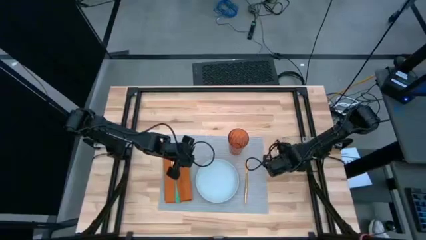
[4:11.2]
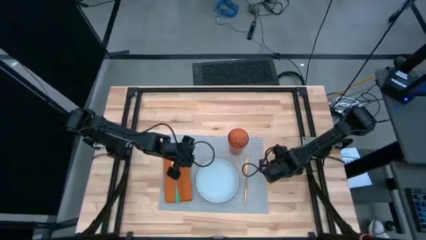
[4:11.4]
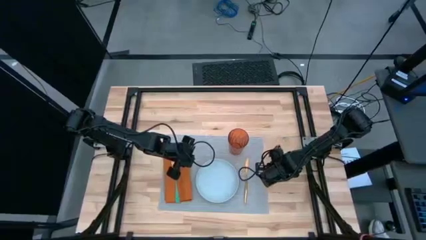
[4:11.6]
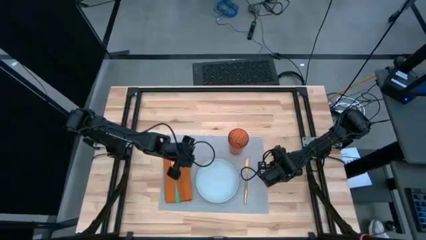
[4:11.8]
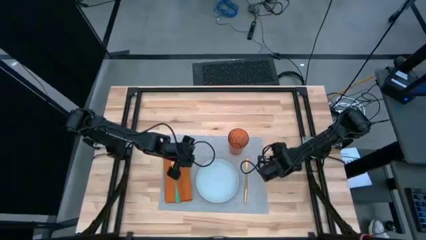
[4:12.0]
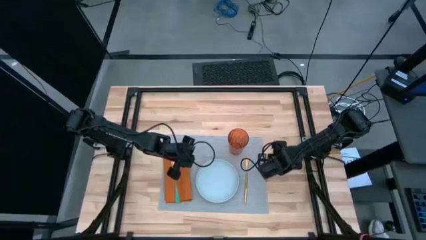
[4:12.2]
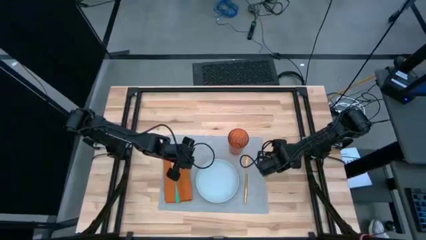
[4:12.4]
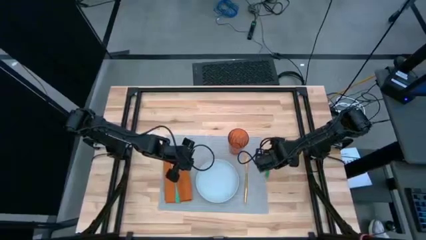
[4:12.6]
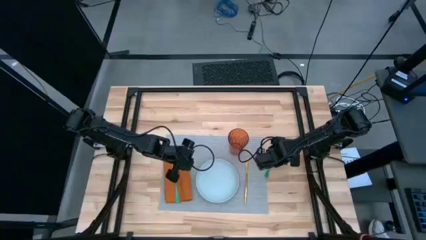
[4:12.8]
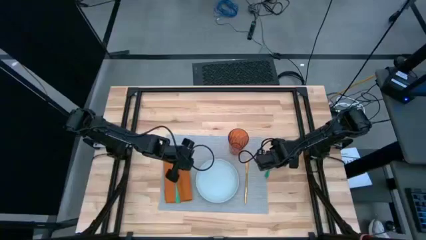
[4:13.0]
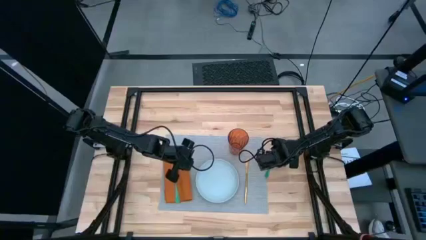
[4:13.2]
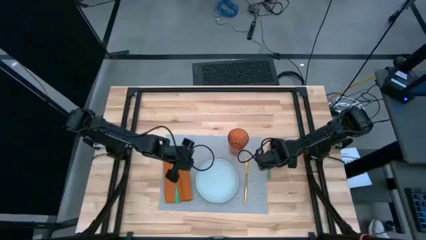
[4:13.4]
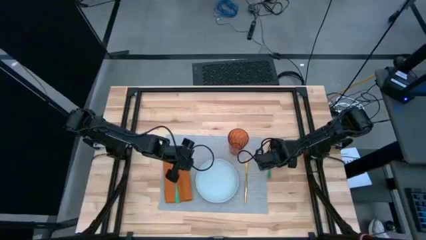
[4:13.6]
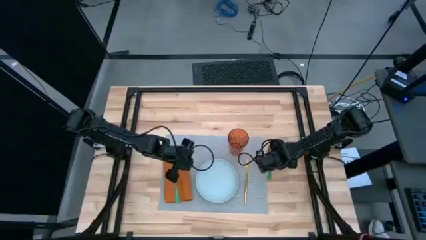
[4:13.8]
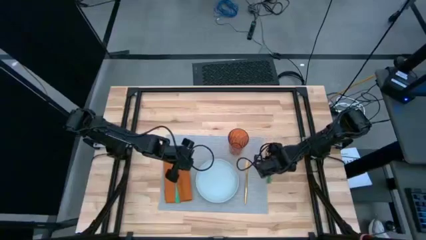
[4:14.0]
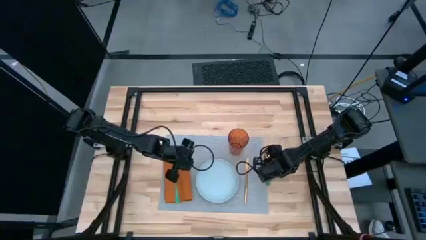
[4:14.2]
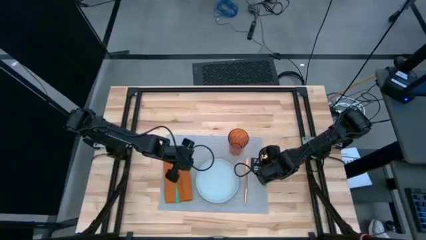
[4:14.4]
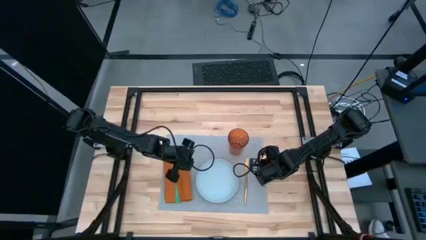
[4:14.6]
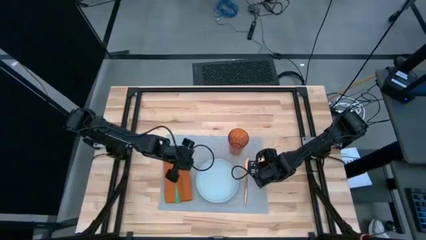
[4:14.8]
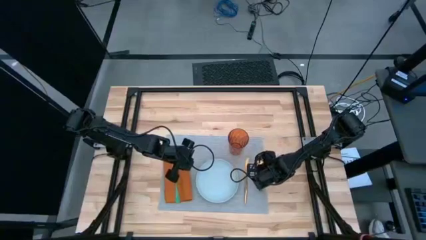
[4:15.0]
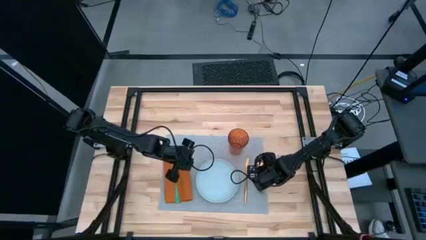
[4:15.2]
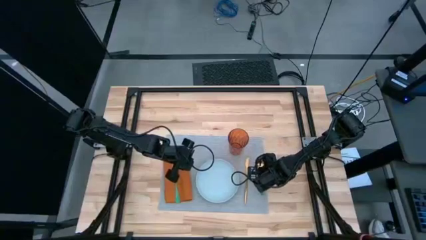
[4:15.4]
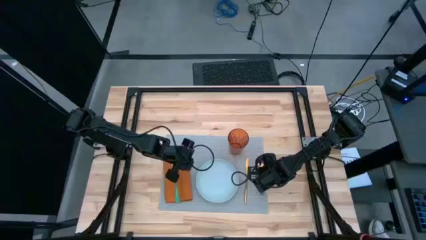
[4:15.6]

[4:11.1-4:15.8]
Task: Set table place
Put the green spoon to the right of the gold table knife on the gray placemat

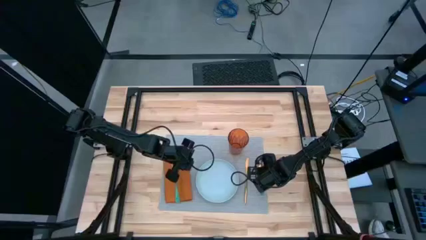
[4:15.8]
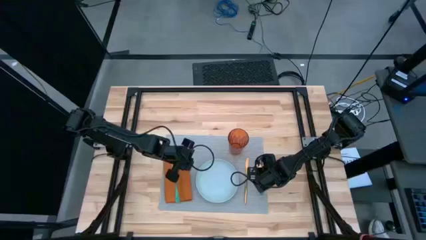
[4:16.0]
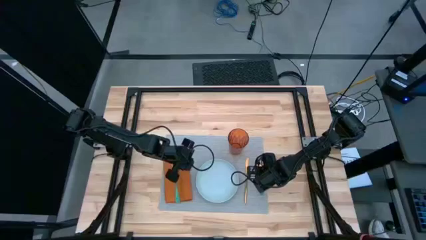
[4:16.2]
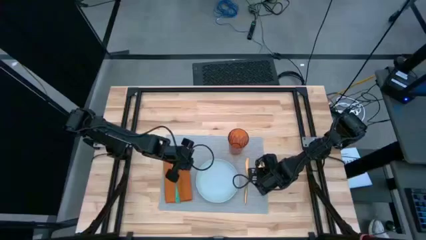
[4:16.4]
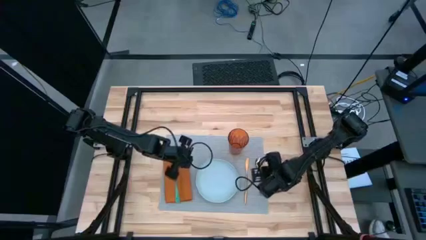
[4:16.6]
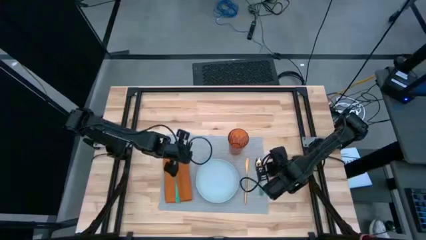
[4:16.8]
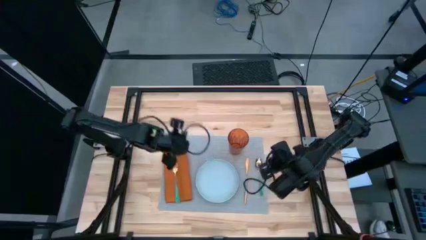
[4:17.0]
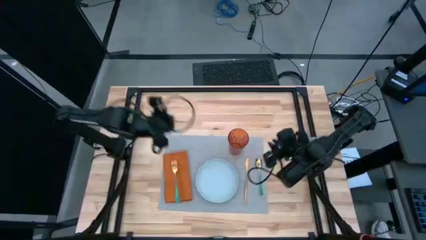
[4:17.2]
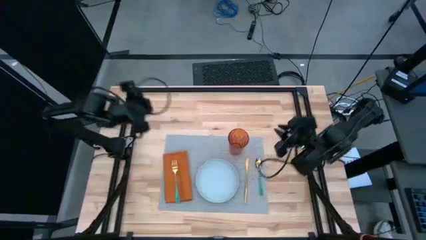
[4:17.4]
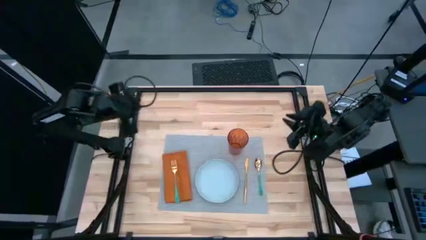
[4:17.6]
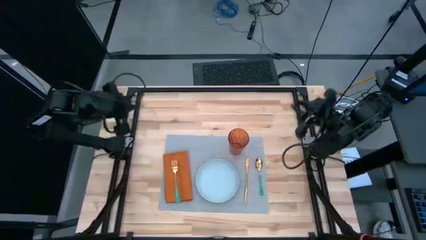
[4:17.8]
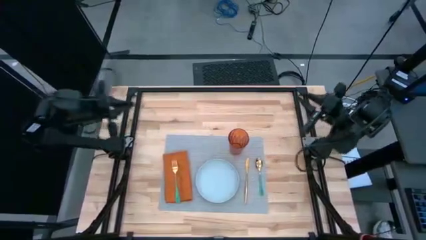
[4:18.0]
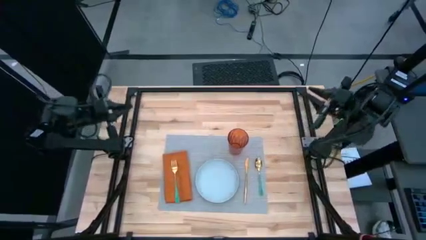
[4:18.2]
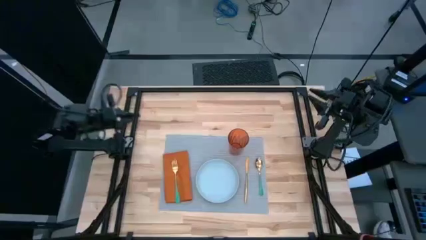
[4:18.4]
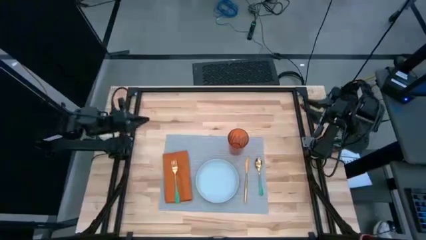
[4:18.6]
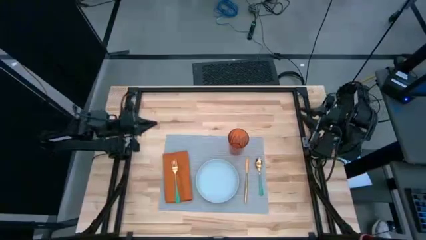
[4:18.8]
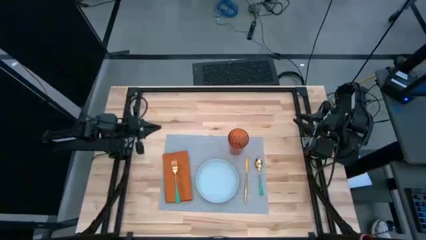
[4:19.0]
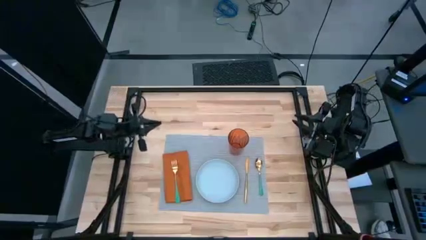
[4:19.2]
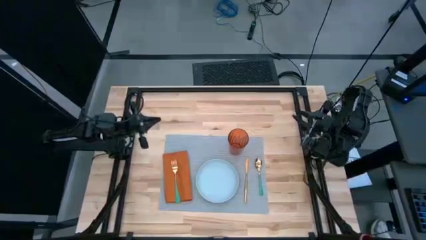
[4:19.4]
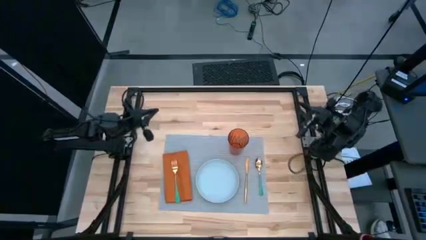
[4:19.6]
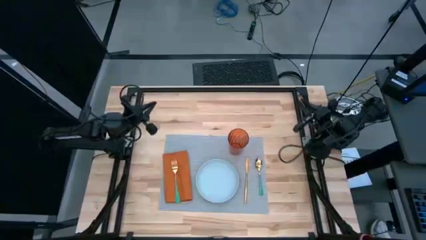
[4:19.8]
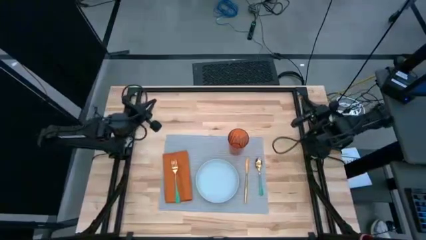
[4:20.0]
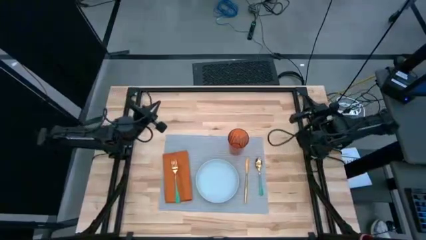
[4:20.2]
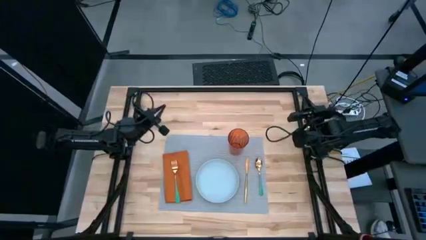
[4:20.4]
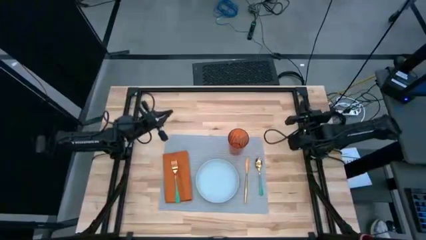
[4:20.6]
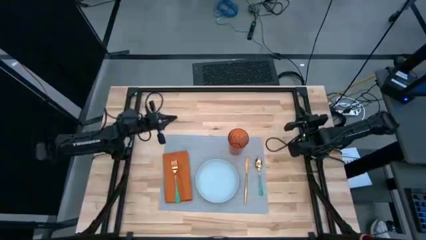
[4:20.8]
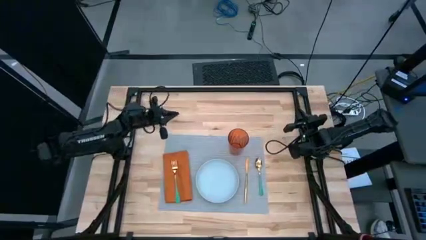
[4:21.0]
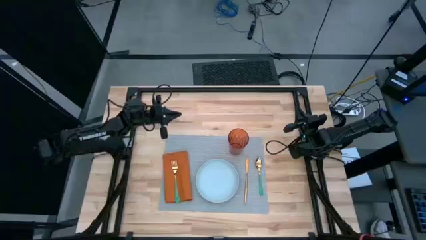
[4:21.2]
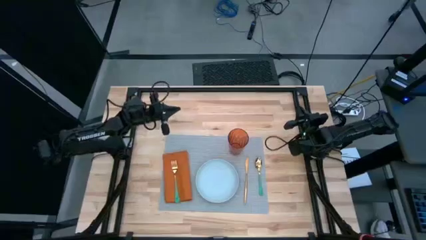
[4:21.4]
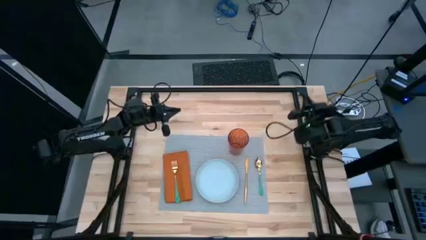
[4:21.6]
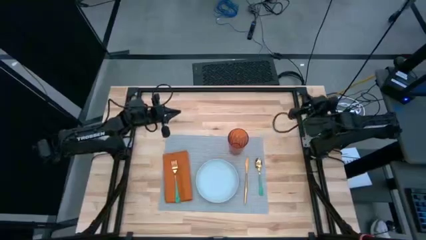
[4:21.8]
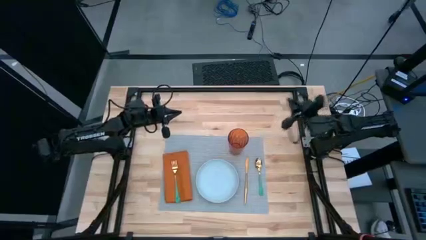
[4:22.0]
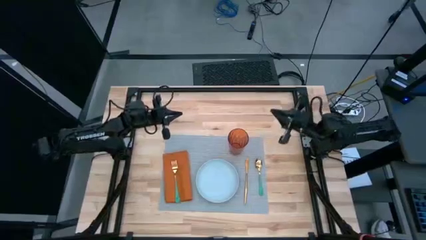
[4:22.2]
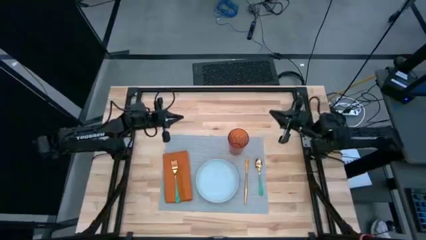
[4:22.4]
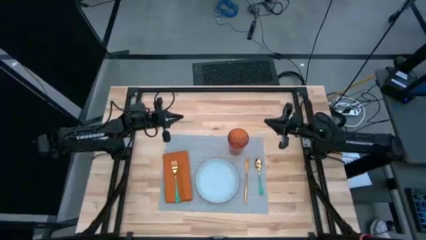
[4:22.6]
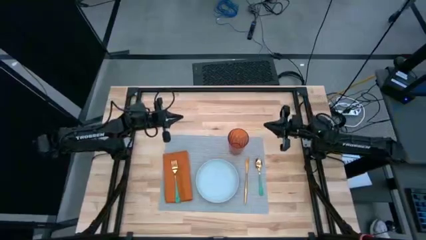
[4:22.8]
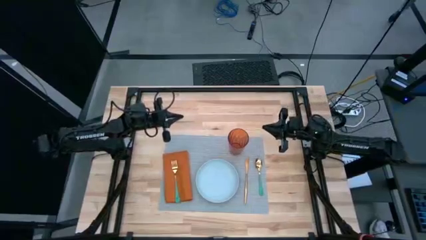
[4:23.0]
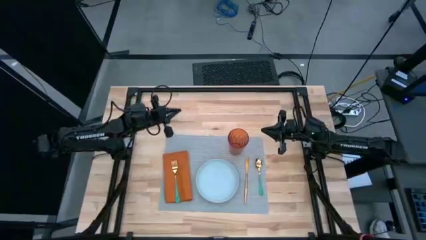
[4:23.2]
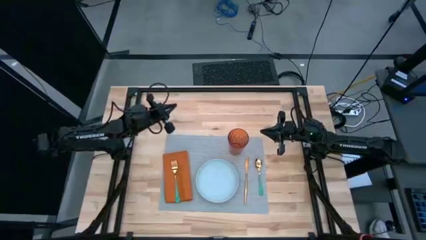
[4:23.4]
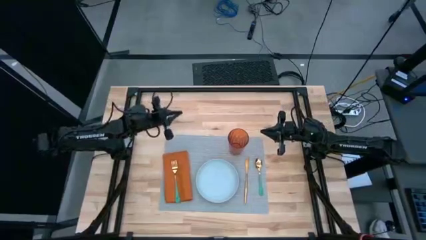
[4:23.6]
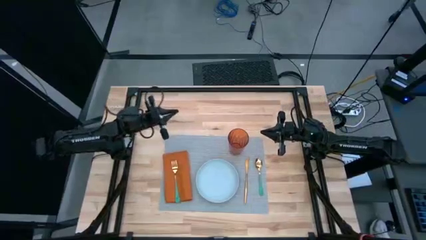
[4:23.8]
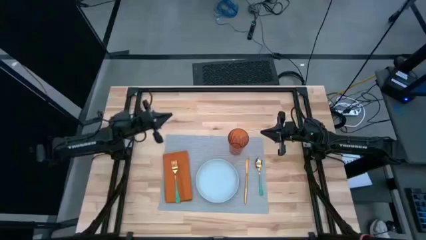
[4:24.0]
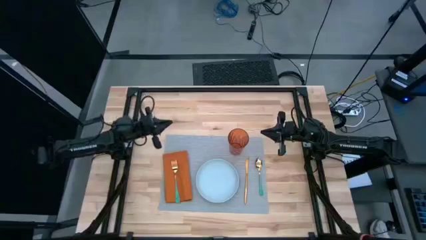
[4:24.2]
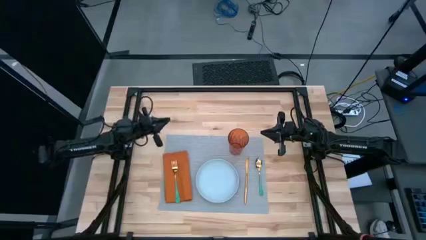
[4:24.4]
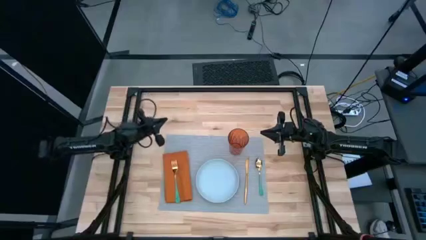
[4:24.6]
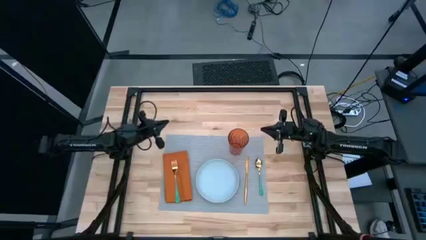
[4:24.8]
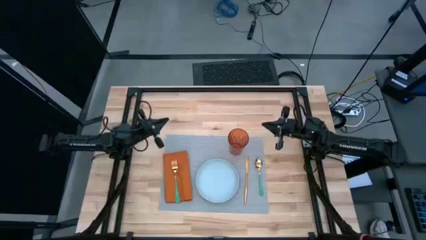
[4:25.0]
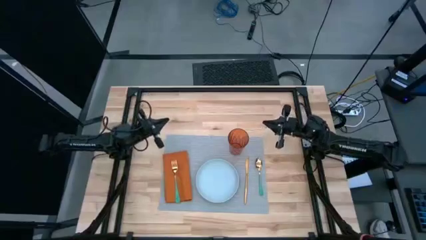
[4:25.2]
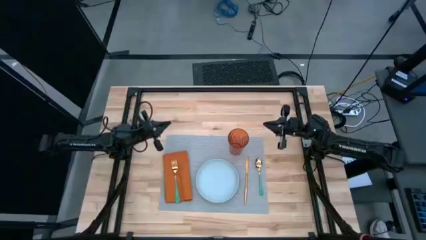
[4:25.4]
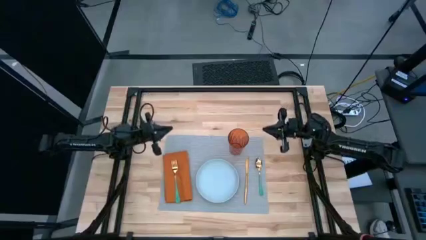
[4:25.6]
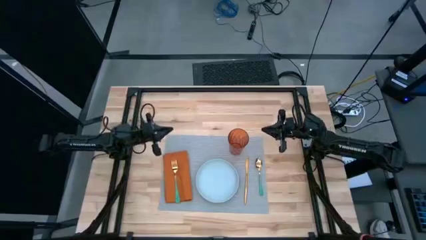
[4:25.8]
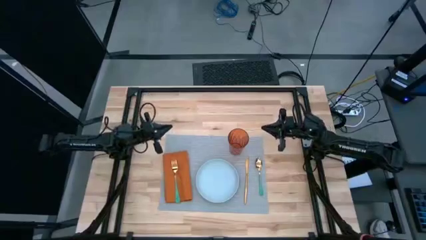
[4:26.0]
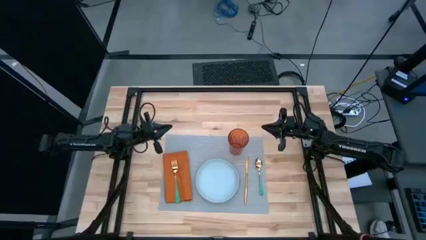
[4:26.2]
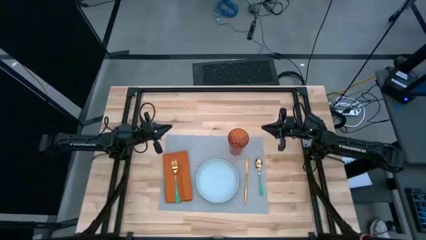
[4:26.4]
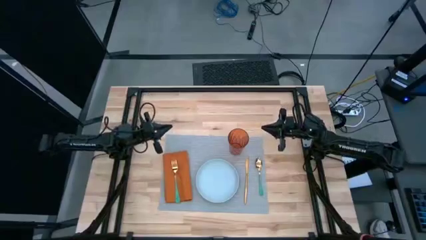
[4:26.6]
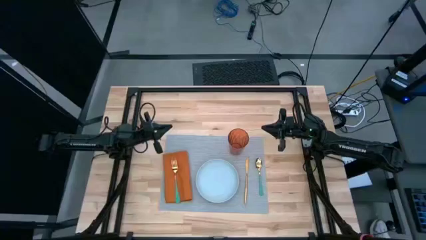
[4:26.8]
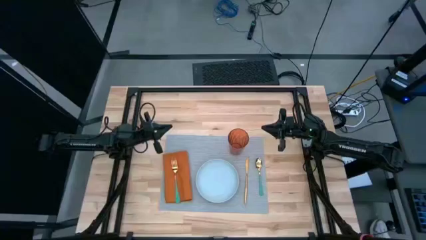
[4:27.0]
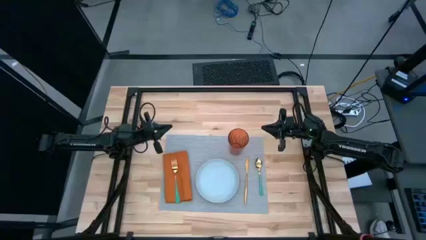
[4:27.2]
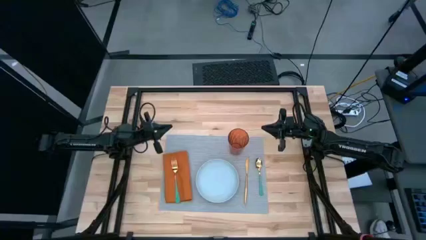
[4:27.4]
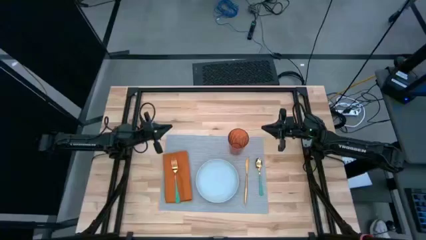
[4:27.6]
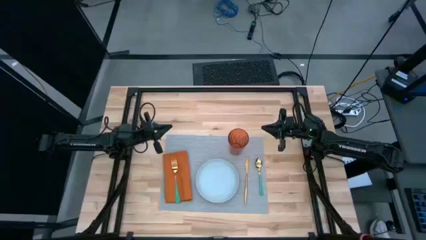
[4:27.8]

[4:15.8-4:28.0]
Return to Home Position

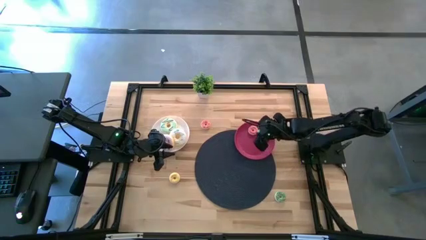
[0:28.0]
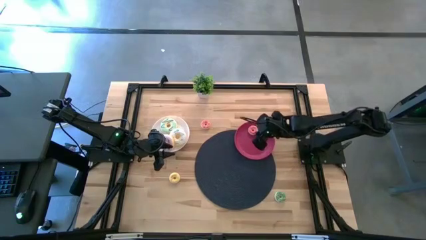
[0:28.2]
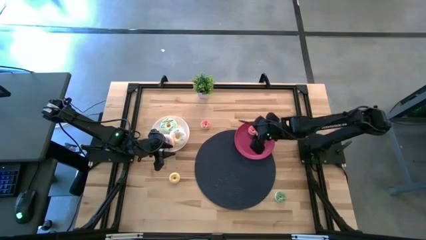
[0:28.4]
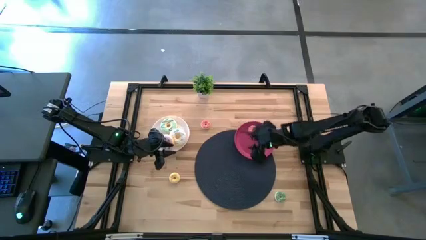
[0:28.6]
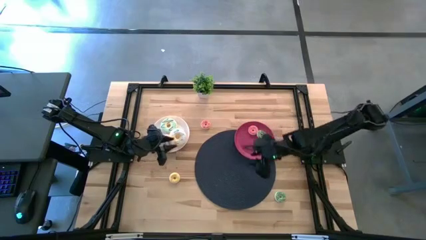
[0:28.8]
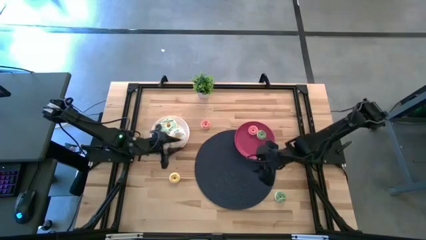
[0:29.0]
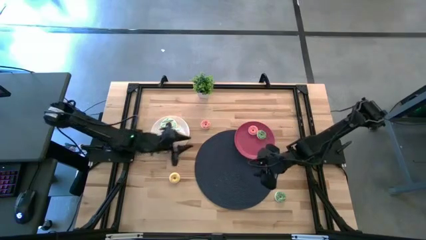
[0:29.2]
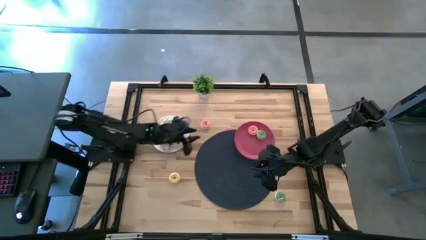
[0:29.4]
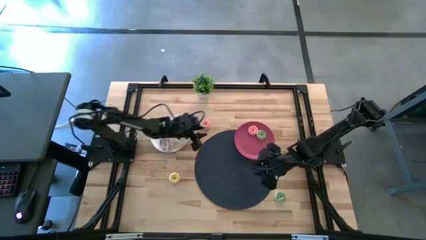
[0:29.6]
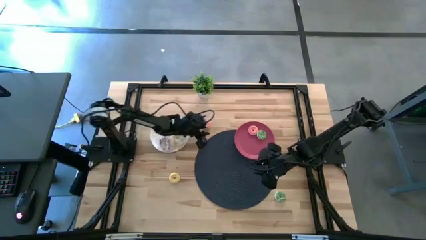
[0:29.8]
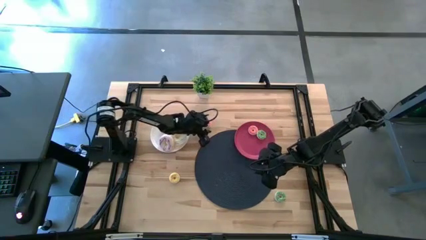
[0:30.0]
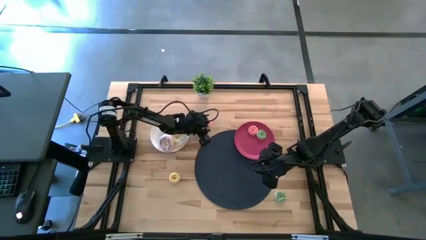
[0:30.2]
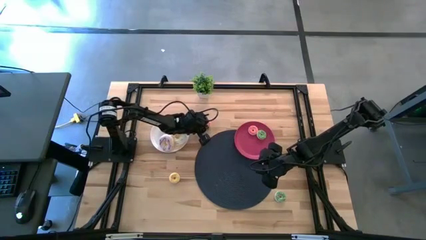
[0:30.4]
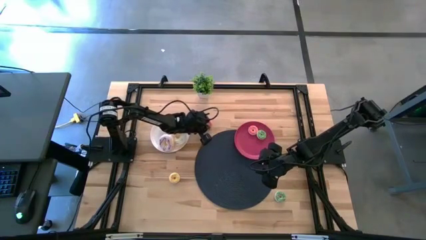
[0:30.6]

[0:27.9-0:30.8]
Task: Pick & Place donuts
Put the small pink donut onto the red plate
